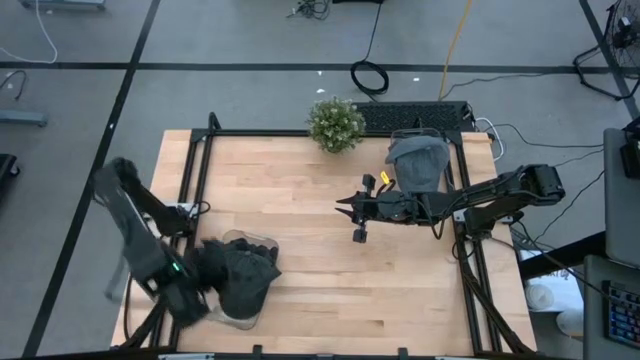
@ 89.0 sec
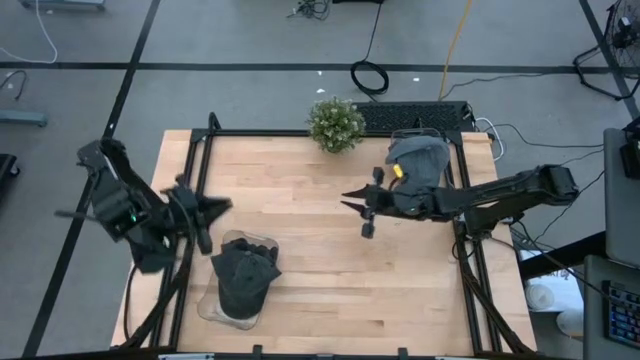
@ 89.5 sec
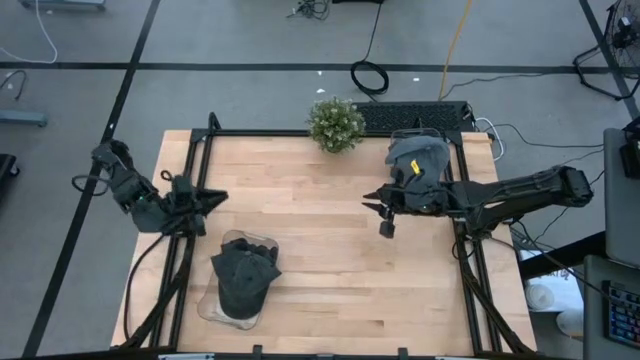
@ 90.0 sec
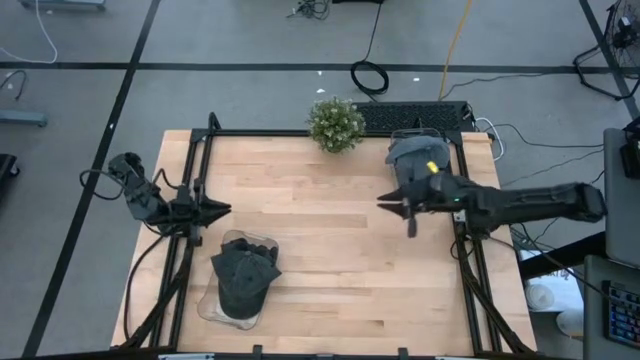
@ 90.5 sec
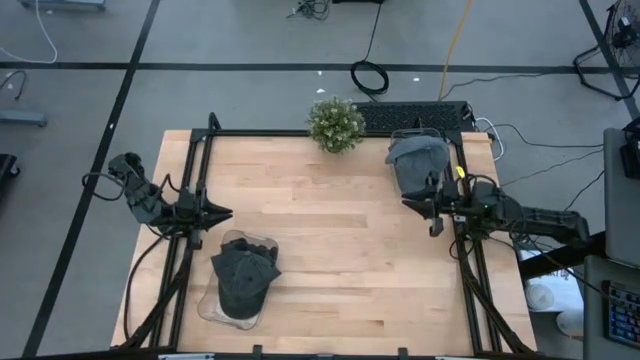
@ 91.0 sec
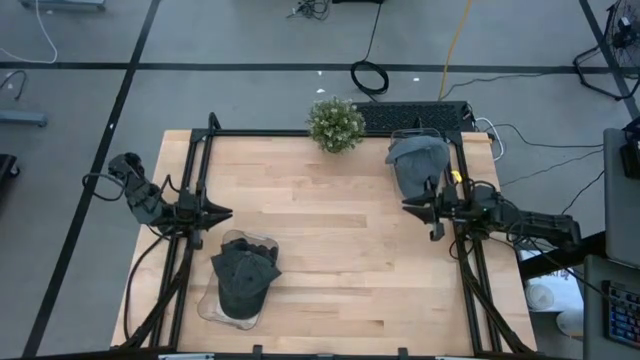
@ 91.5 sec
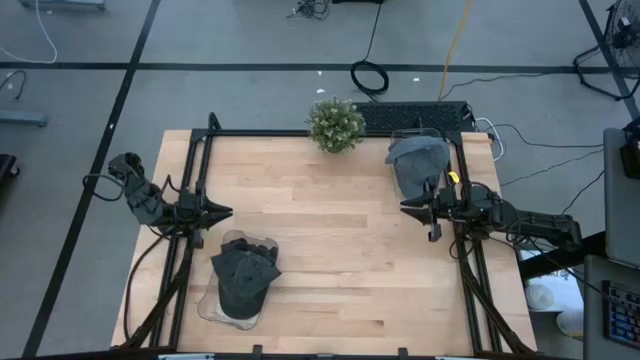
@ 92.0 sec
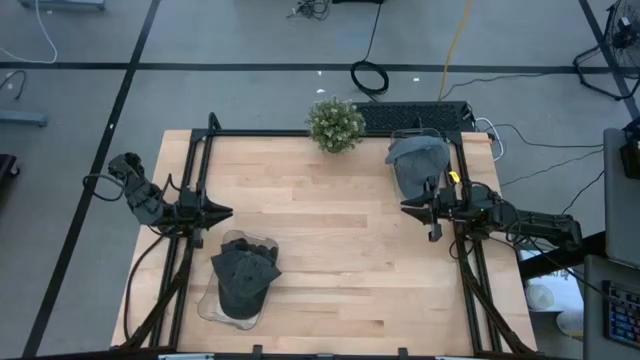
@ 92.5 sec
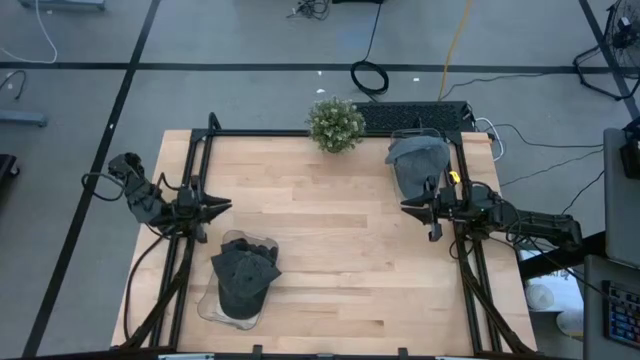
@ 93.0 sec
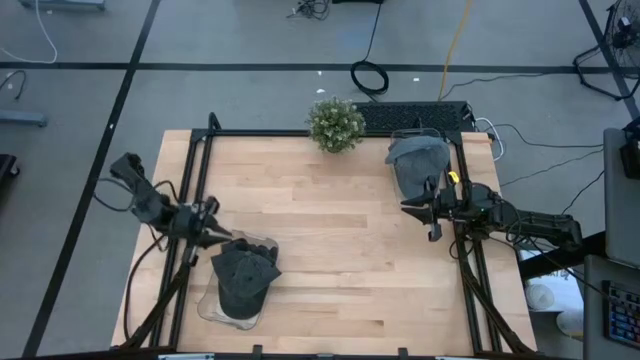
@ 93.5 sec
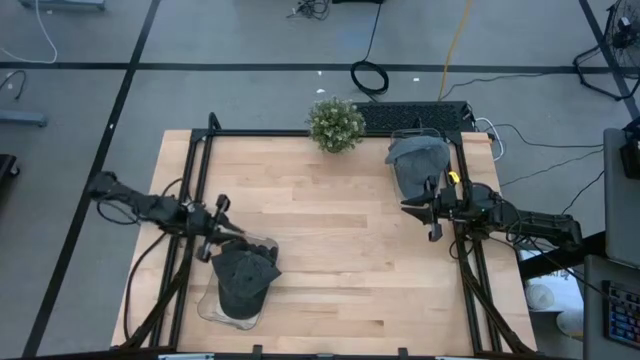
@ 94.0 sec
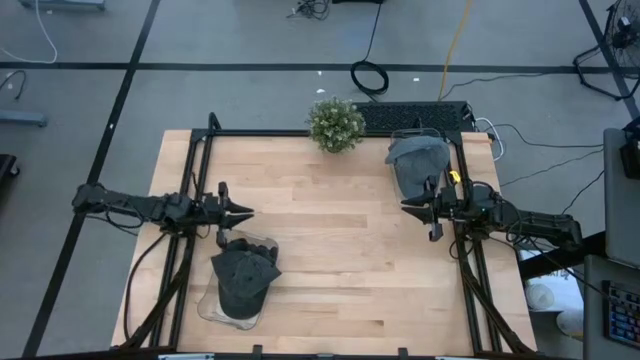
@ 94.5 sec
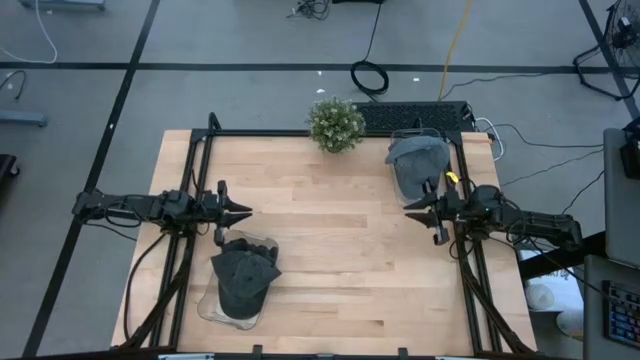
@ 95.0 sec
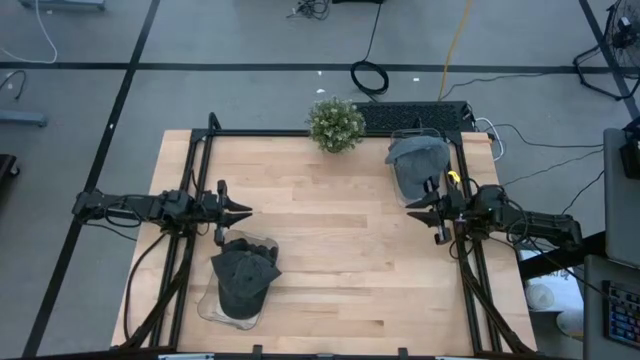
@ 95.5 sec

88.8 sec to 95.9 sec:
Task: Pick & Place hat
Return to Home Position

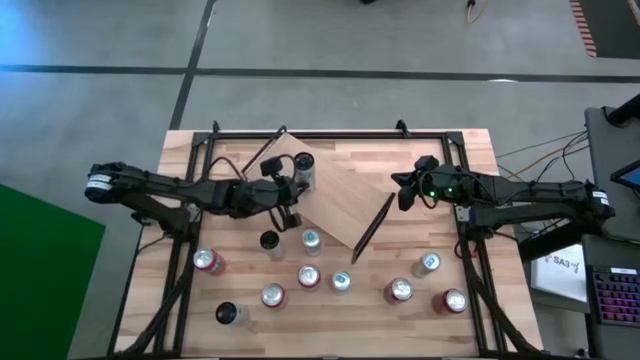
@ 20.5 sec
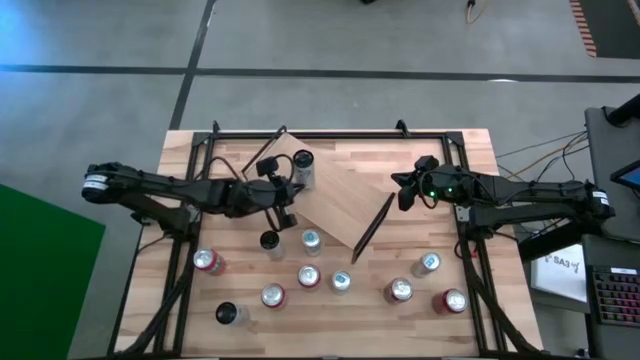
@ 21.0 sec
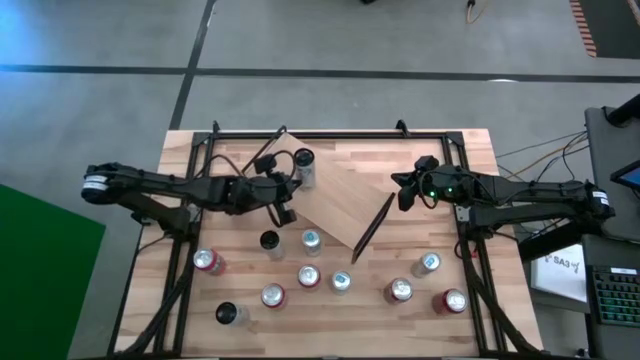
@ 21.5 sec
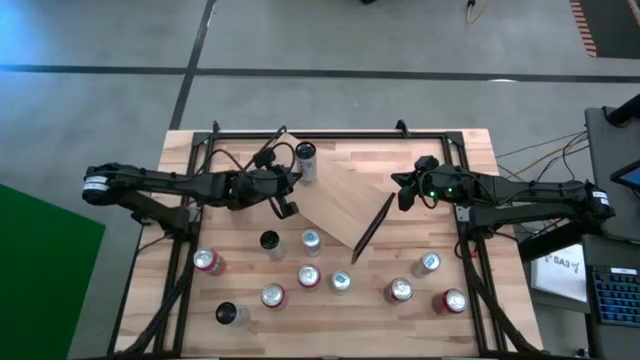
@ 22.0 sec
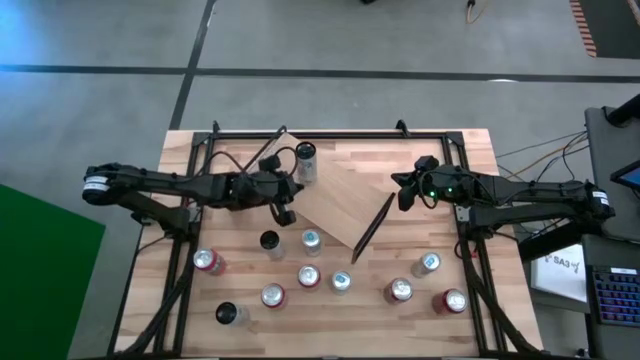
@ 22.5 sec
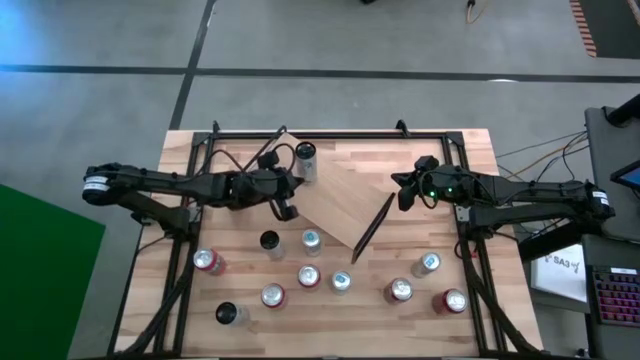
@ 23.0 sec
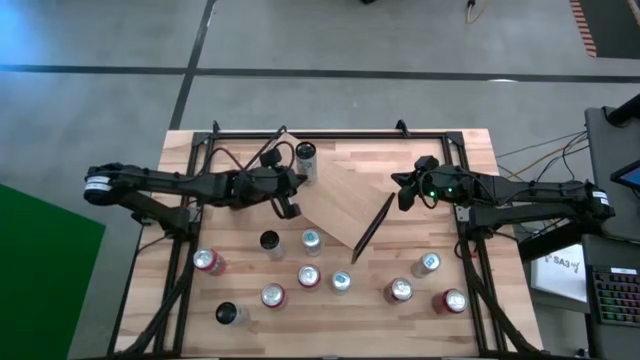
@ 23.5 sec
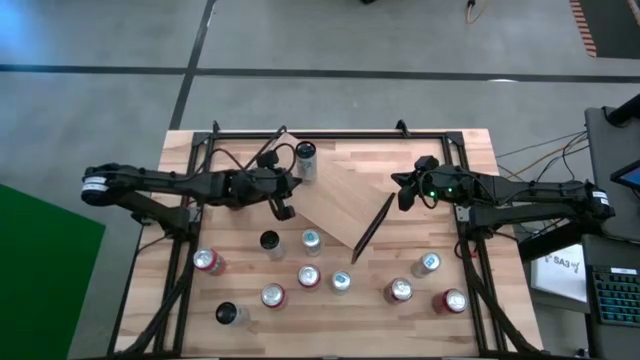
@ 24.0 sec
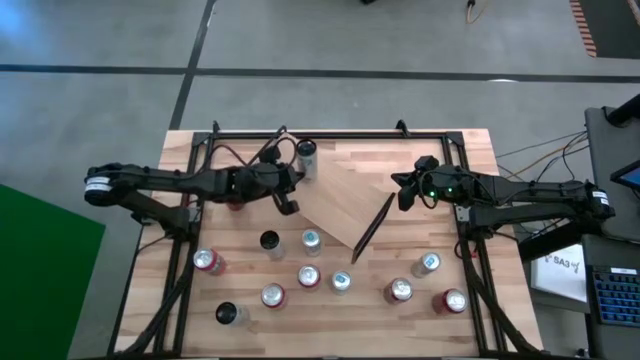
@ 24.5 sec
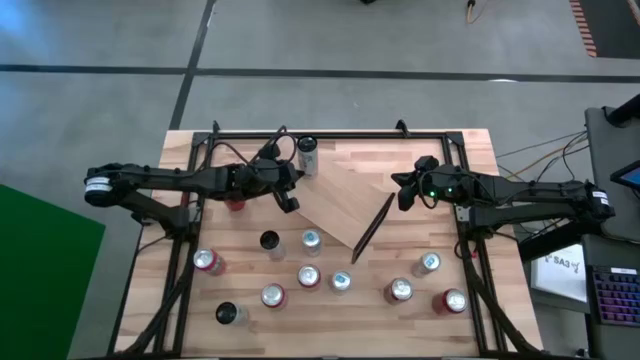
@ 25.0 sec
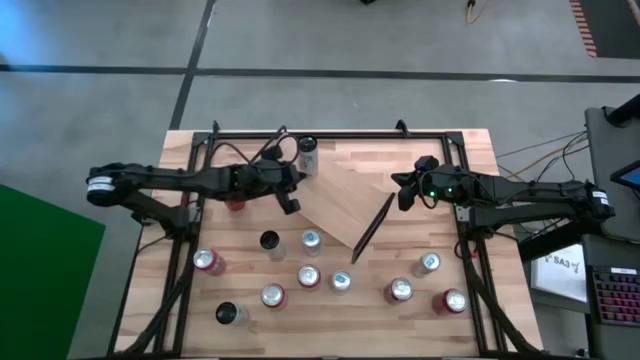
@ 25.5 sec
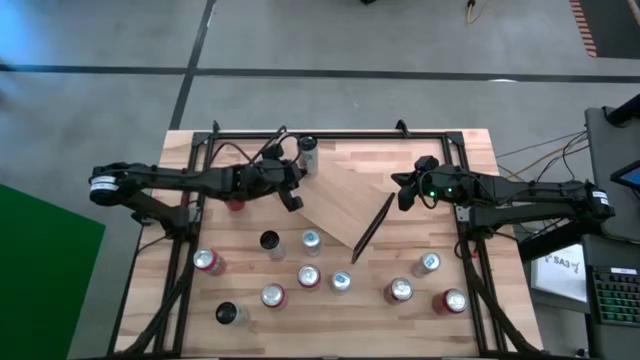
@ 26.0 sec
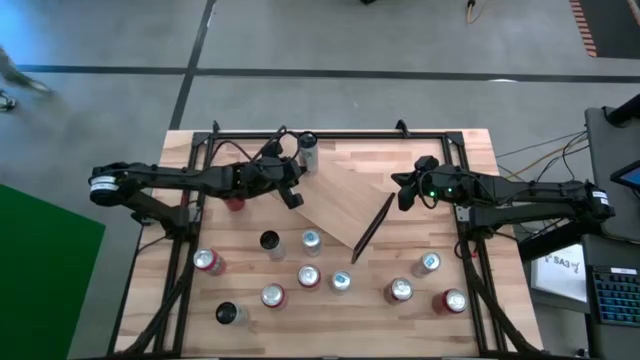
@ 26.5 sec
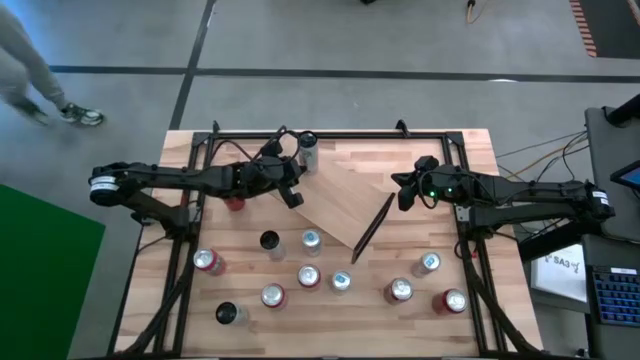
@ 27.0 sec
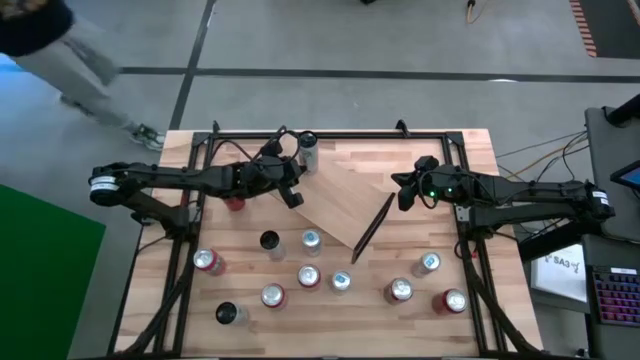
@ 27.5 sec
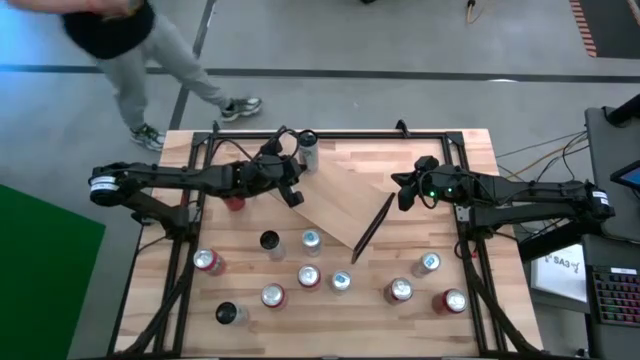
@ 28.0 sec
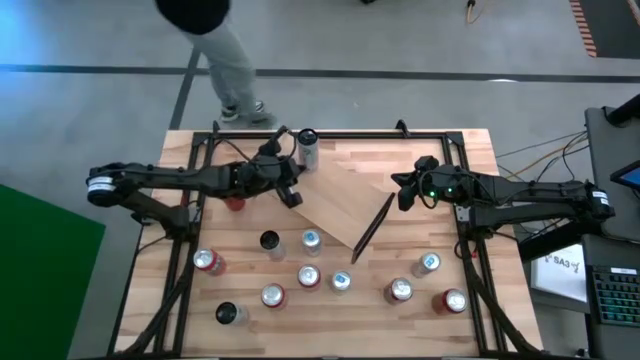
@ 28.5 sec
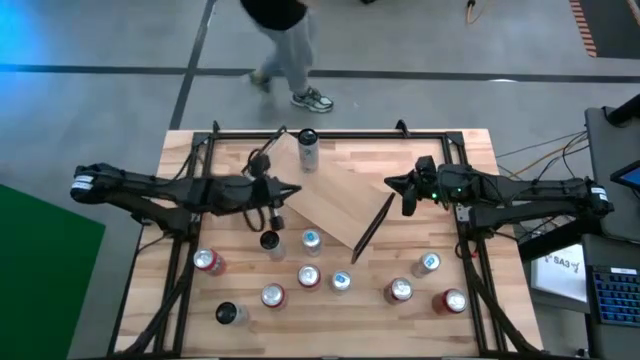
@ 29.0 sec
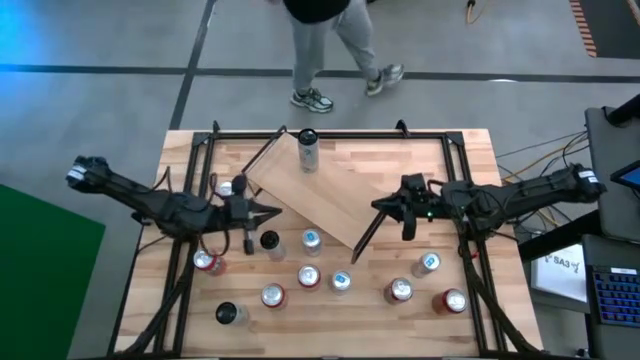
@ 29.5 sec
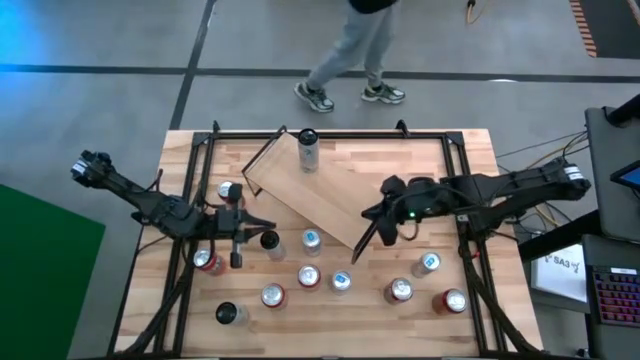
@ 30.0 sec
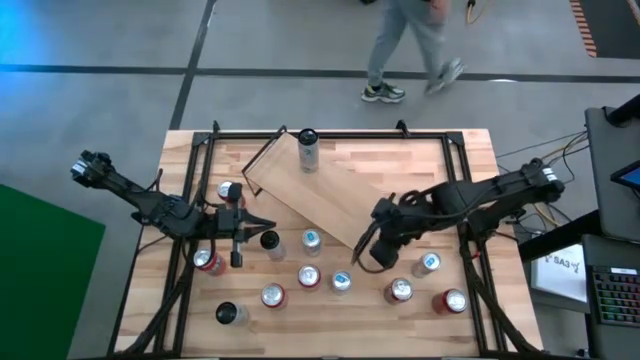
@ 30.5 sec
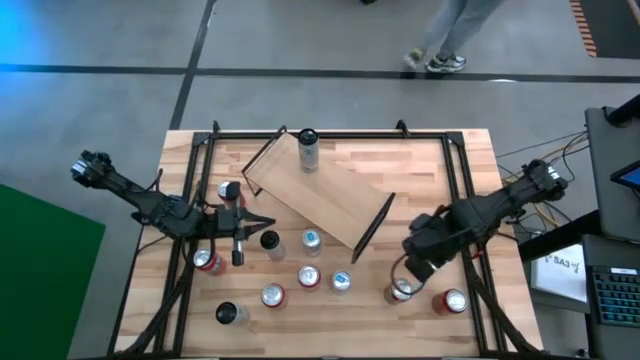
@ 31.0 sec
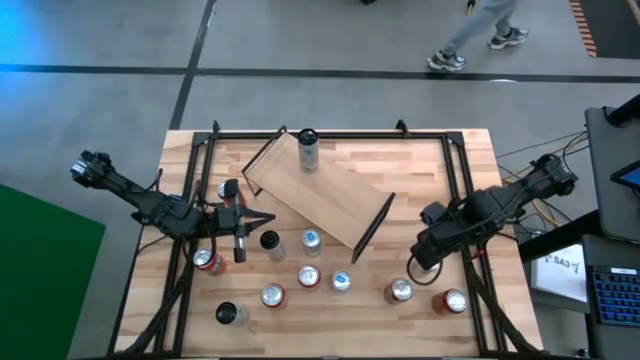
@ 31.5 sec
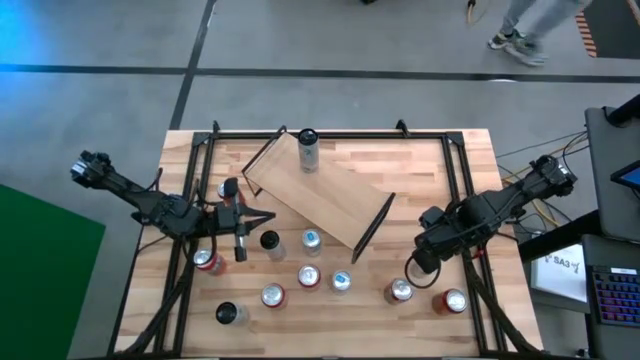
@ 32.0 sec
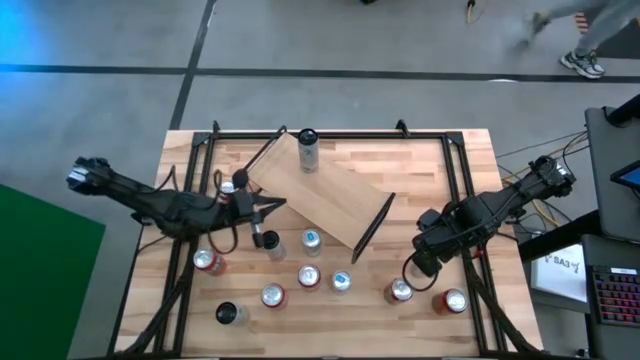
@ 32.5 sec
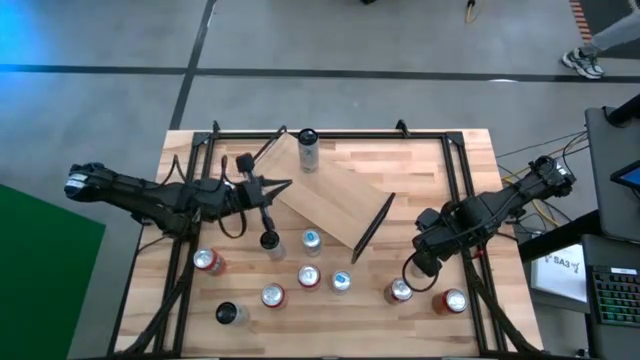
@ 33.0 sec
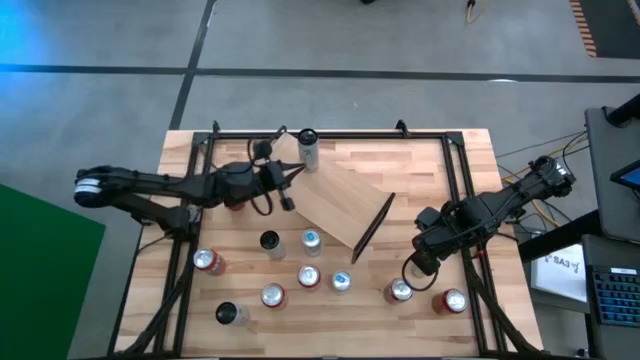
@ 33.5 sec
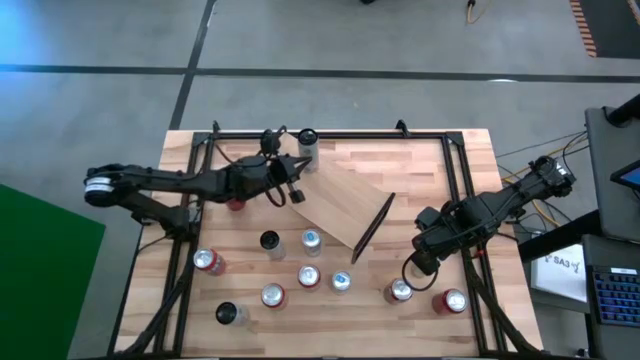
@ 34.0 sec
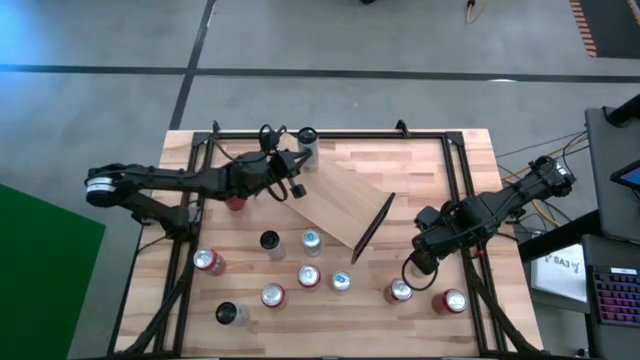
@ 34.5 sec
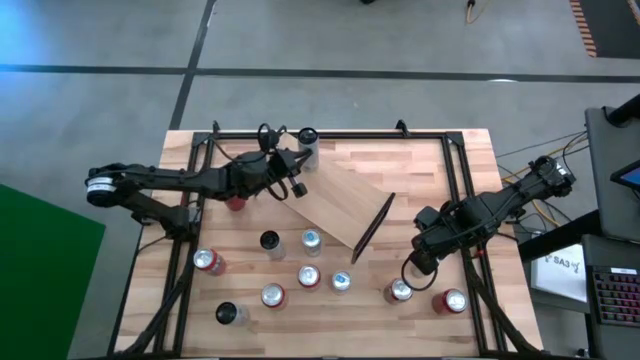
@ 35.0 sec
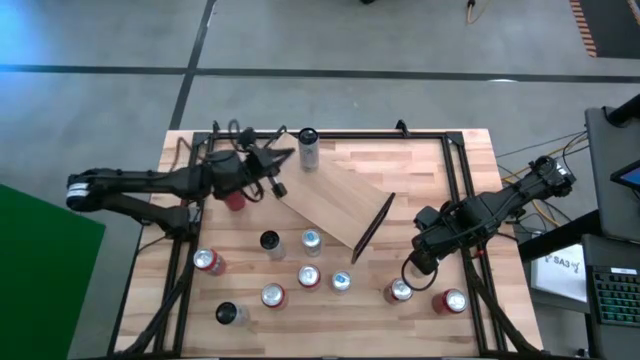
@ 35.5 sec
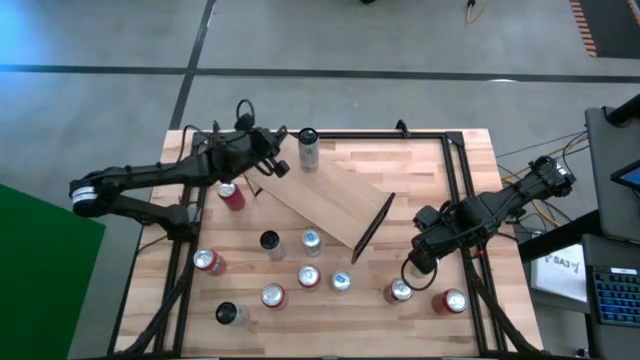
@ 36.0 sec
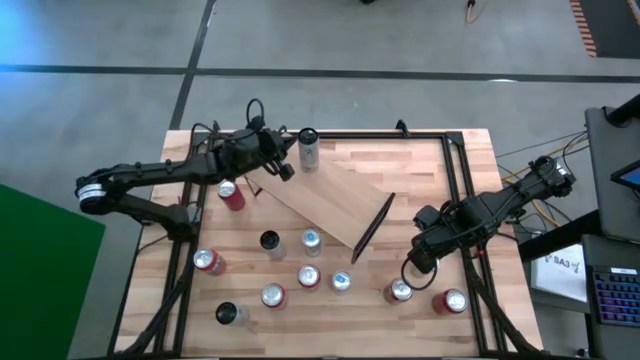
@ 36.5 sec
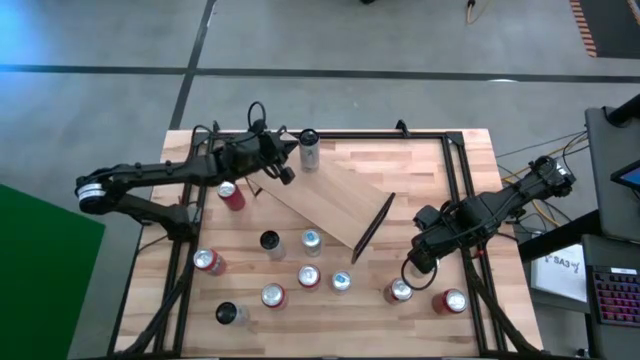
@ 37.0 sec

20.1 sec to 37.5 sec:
Task: Place canned beverage on shelf
Put the white/pink soda can on the shelf
